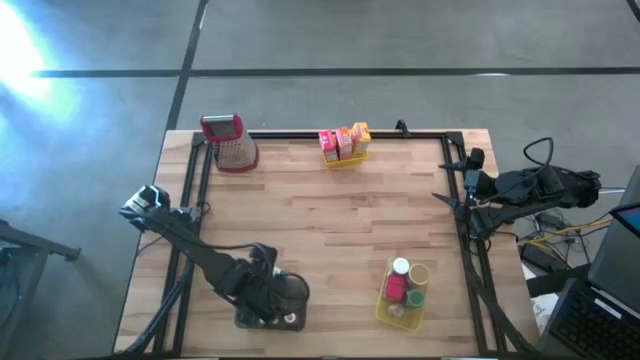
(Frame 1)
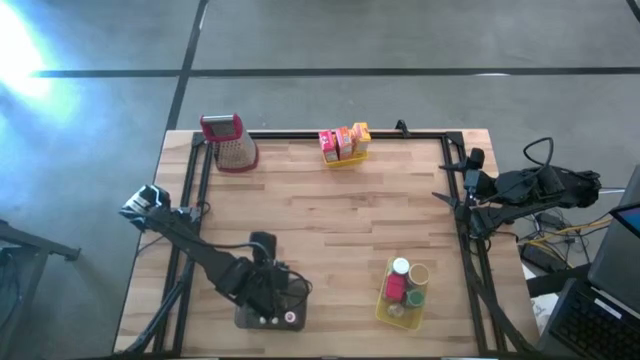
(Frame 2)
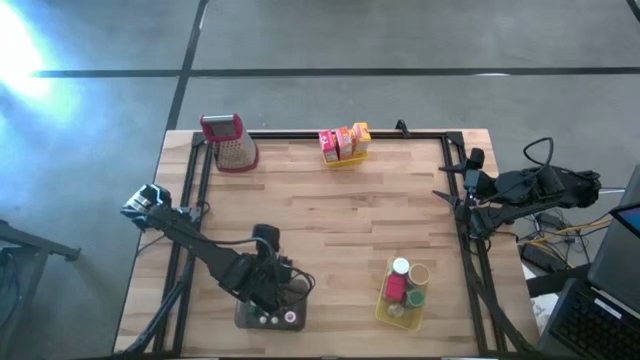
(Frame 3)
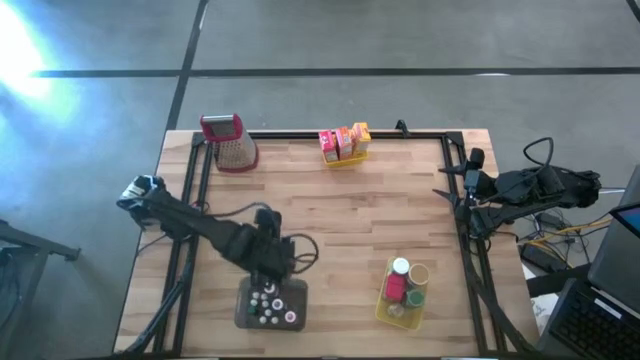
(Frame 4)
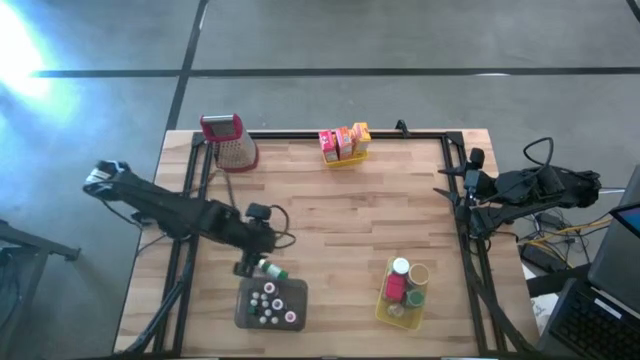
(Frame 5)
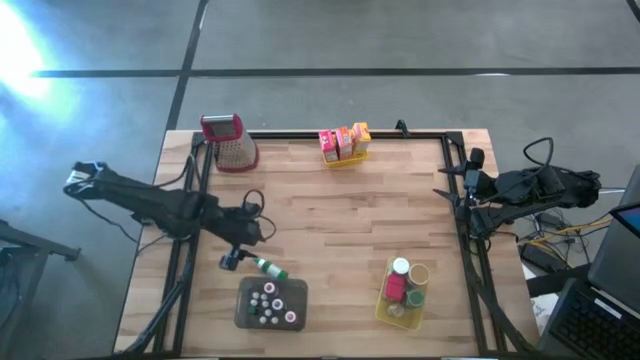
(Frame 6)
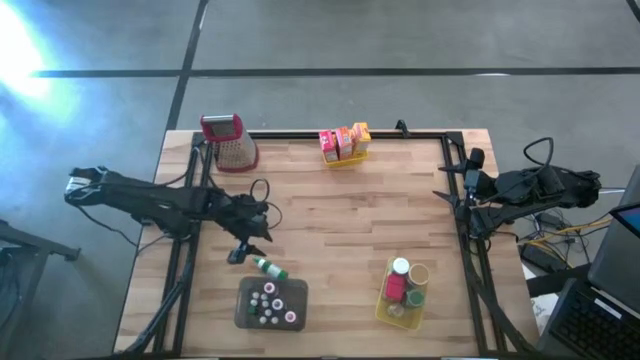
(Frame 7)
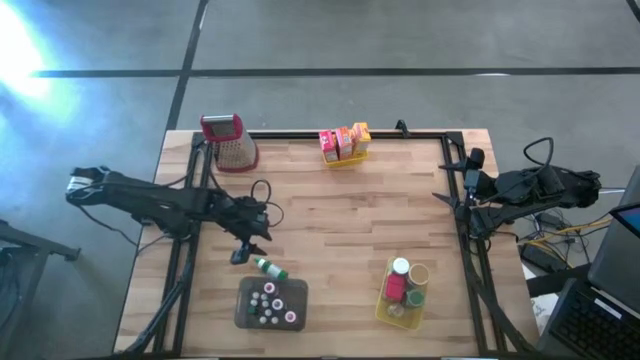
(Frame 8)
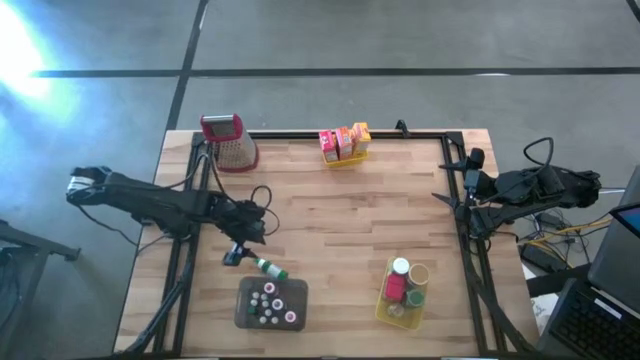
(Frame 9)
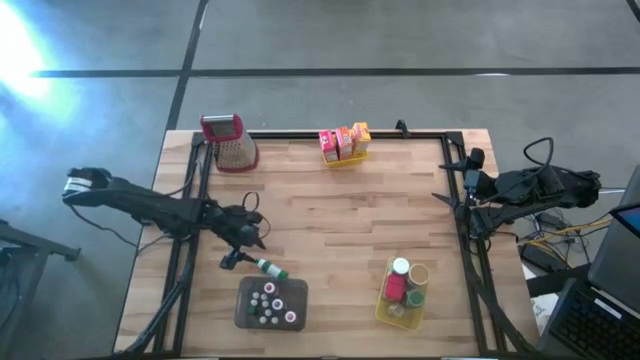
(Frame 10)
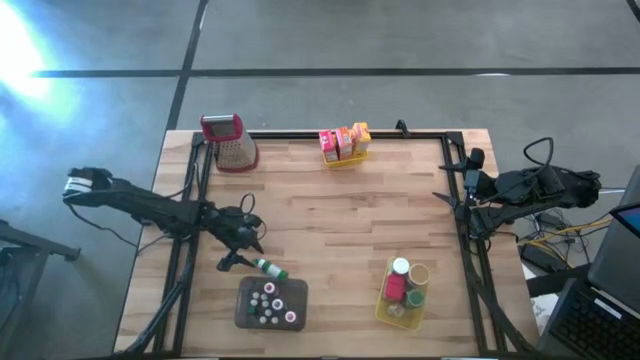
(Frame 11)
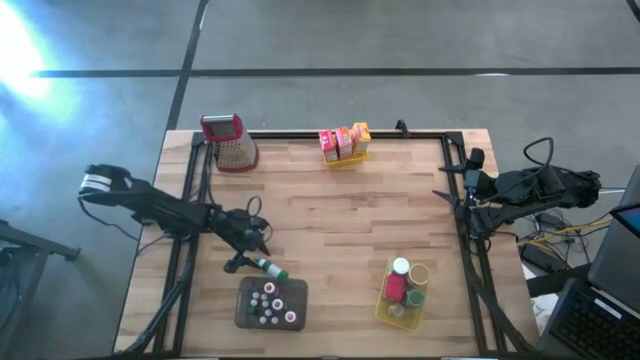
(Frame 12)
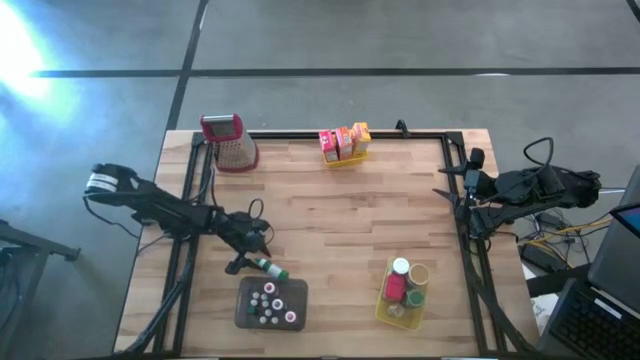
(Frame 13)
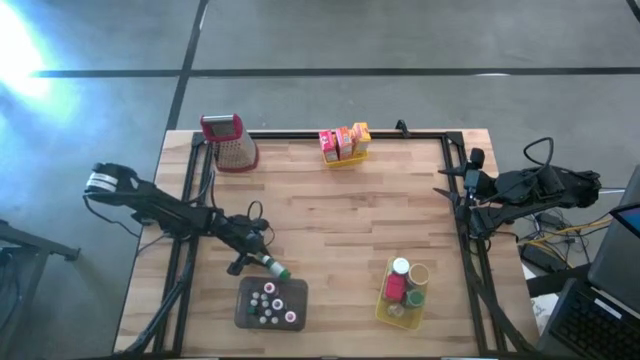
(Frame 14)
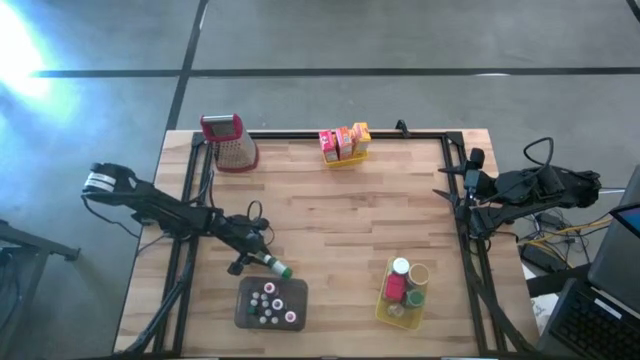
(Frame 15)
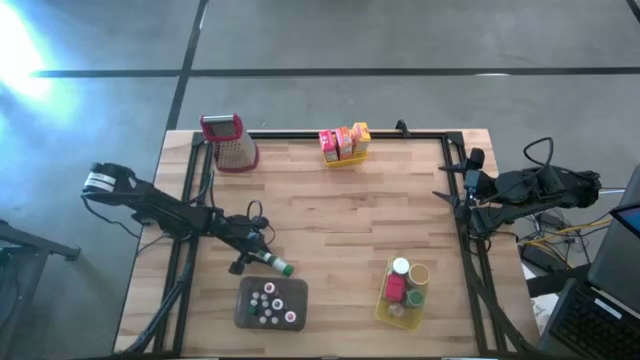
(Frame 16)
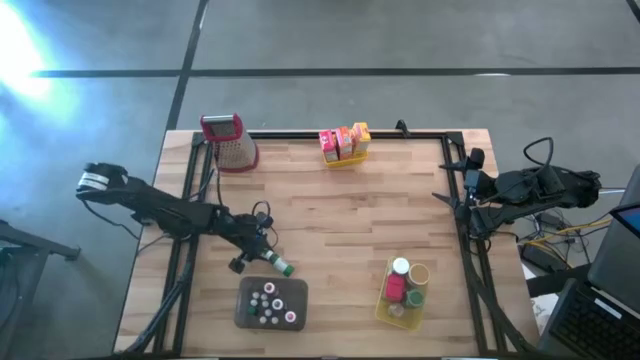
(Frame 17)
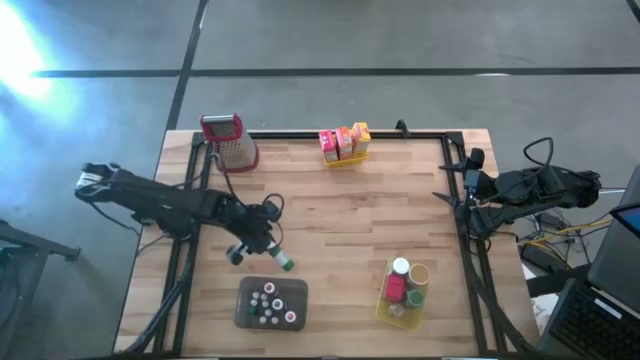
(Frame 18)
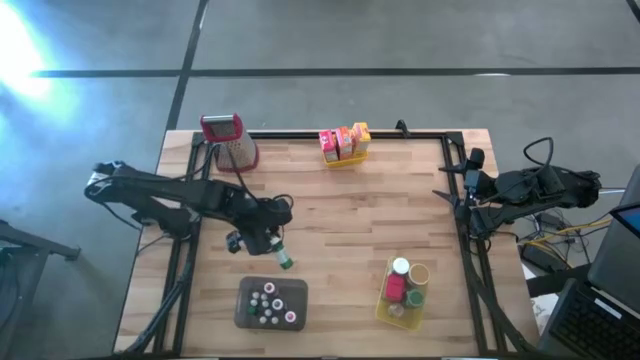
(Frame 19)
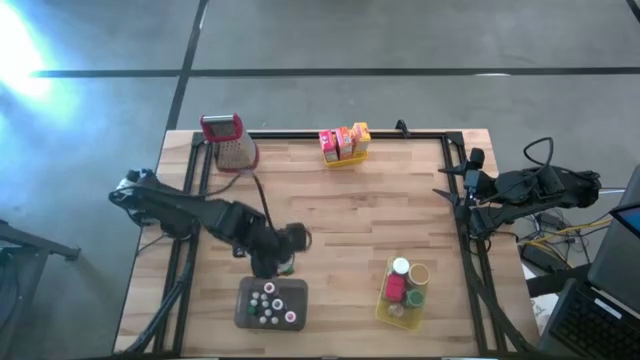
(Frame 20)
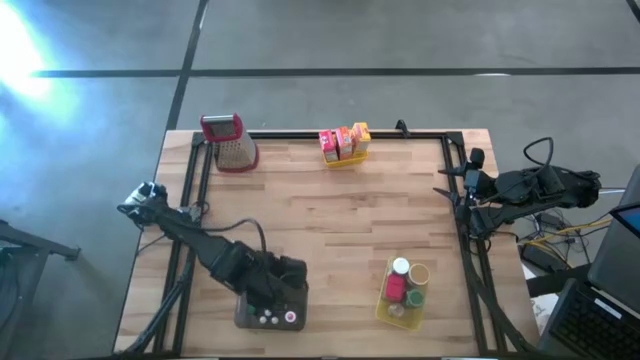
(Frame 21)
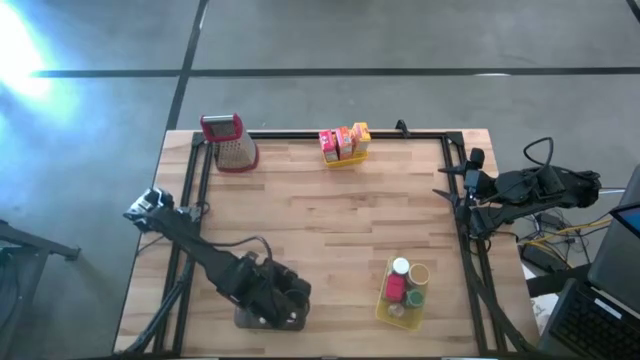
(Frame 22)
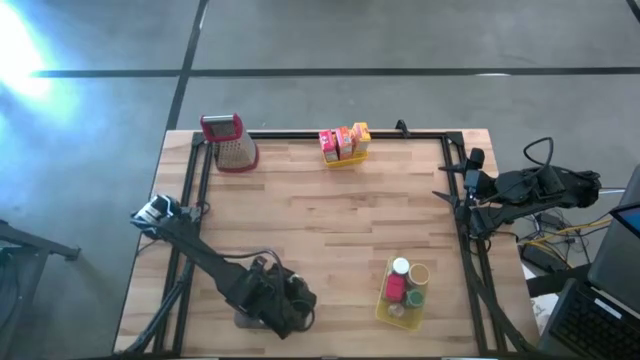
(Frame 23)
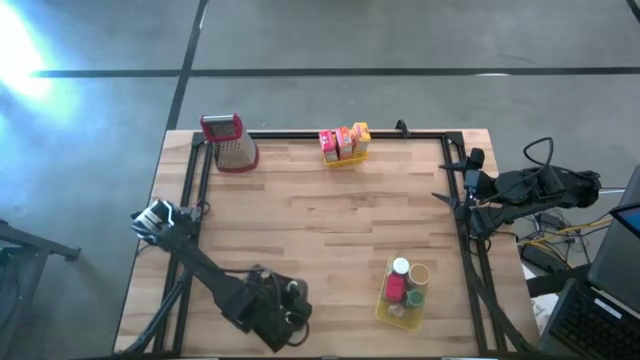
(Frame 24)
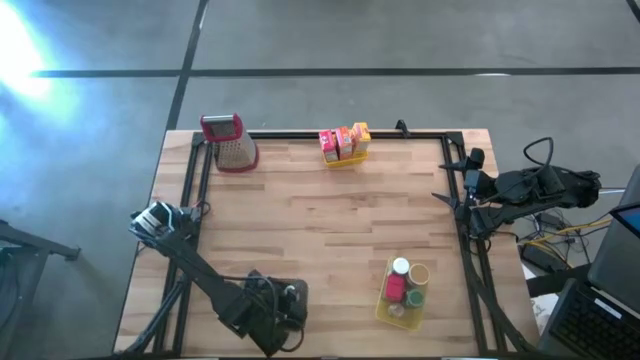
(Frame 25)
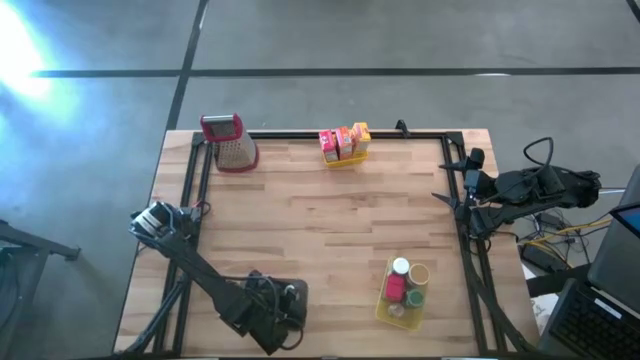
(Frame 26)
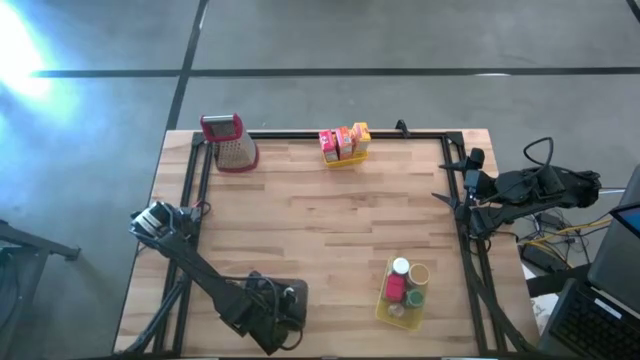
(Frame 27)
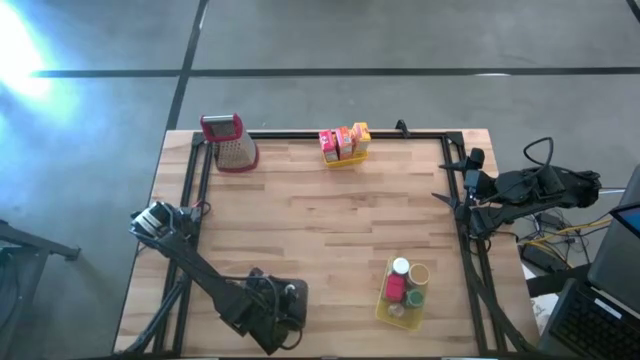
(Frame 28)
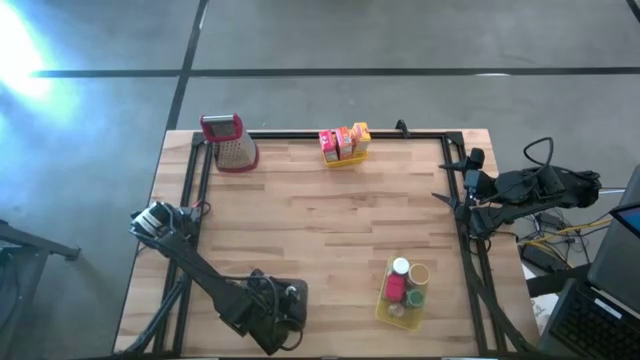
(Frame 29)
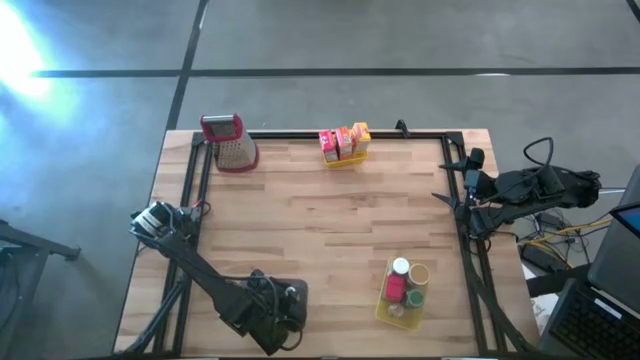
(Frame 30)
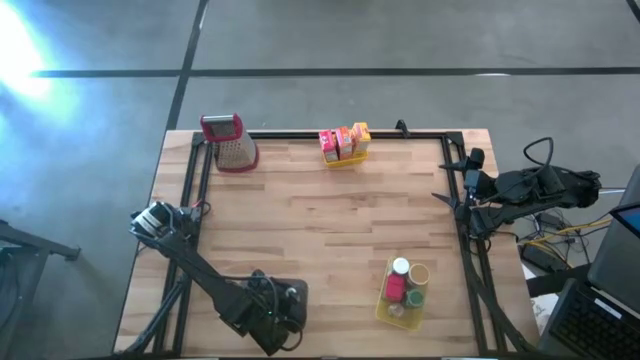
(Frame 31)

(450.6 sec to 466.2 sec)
Task: Pick & Place Kitchen Items
Put the large green food coloring bottle into the black bin

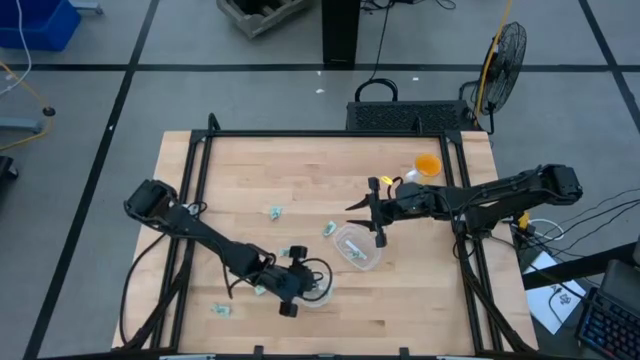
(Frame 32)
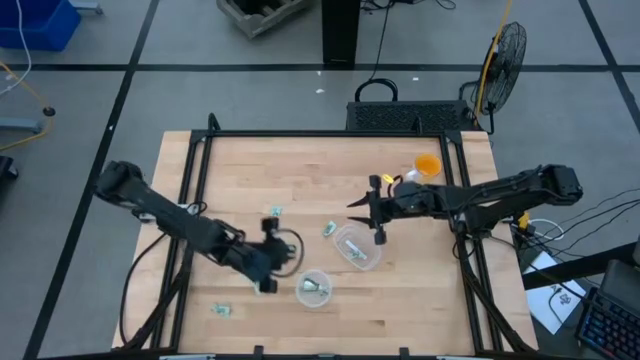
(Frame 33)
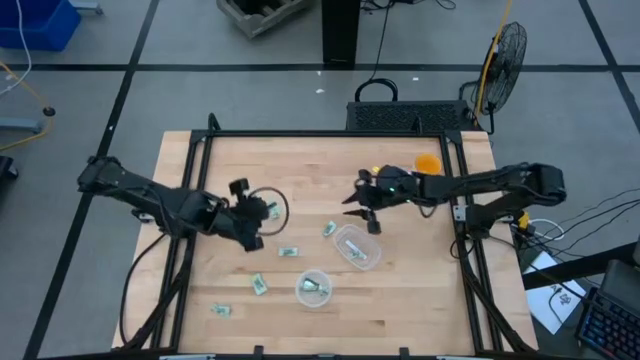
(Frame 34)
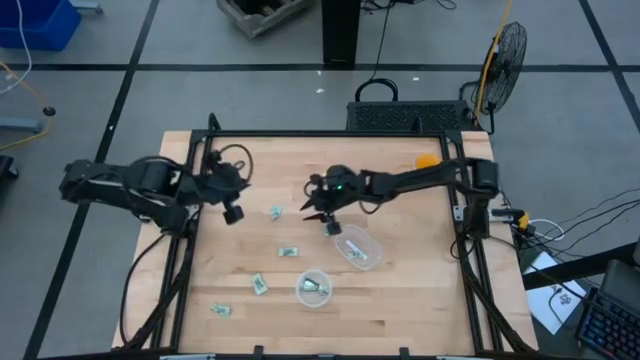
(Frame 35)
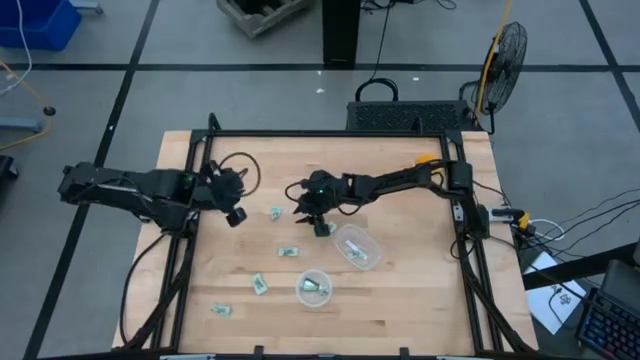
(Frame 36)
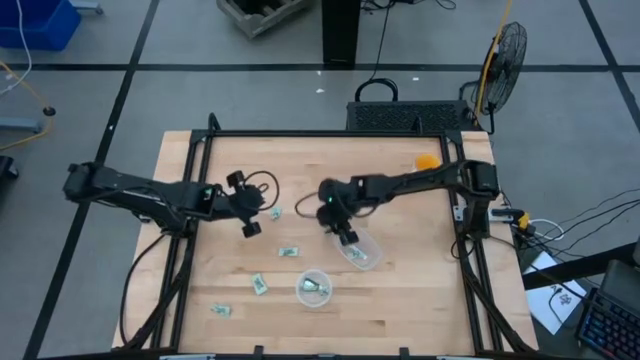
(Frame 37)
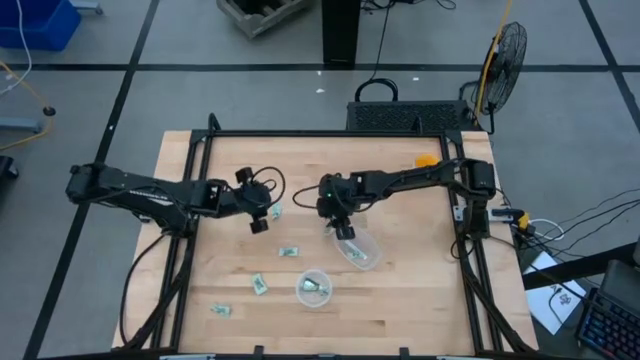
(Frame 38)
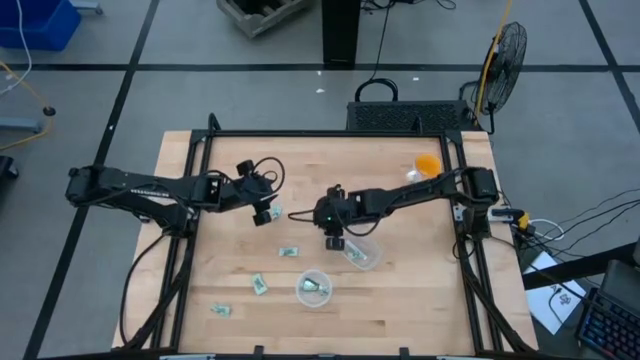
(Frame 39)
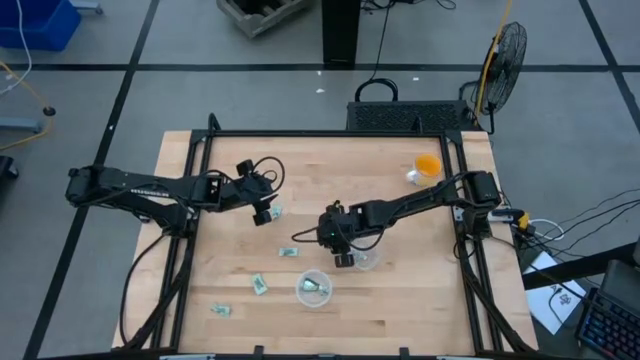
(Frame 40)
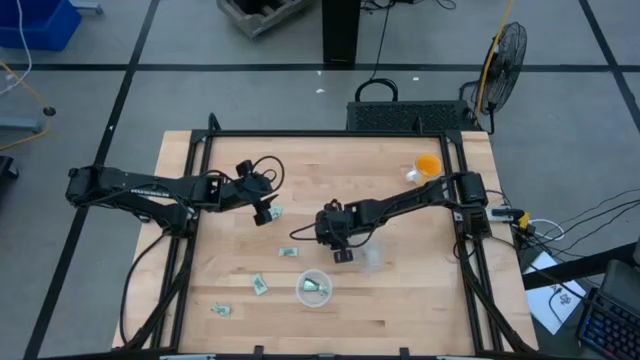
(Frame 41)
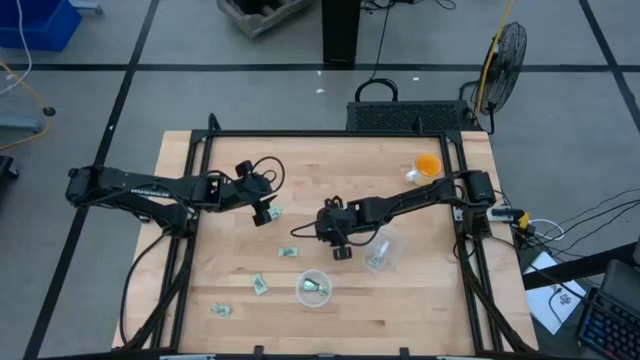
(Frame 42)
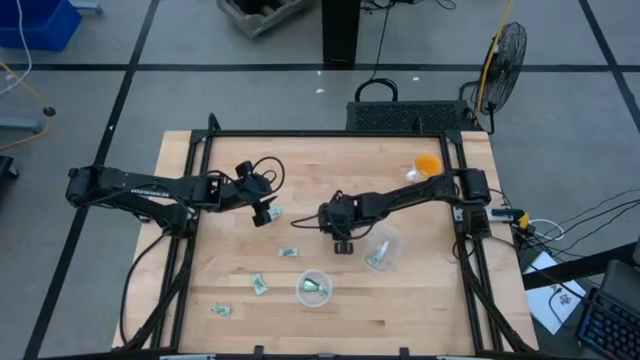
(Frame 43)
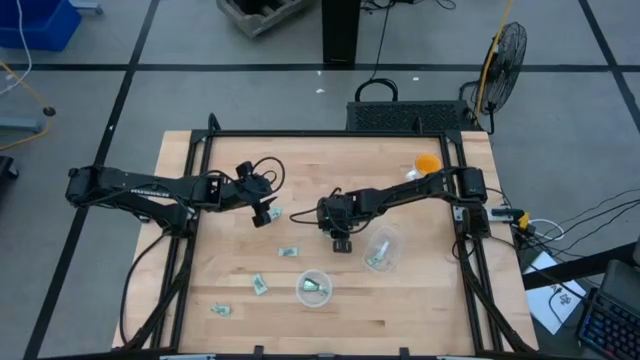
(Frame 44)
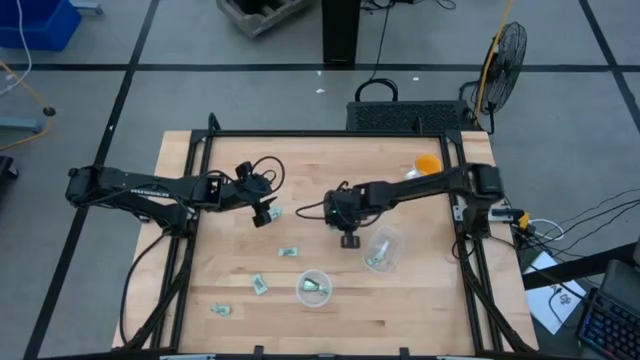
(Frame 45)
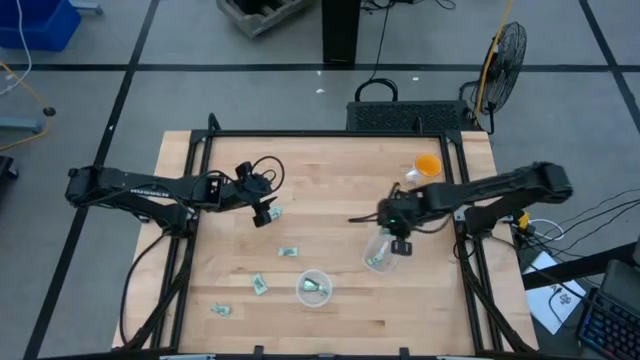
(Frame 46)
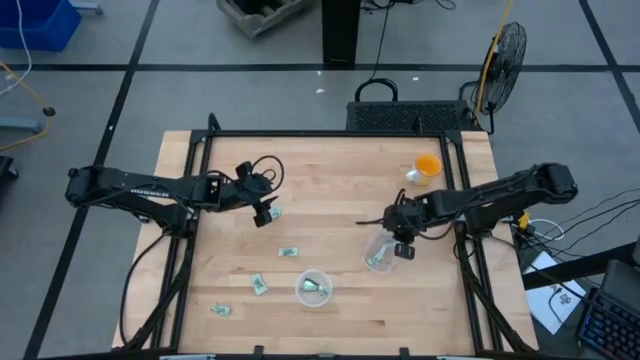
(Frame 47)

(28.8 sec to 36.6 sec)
Task: Pick and place items into bin
Put the Stevia packet into the right transparent bin
